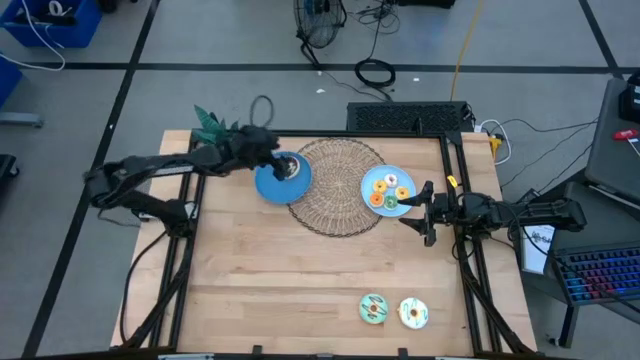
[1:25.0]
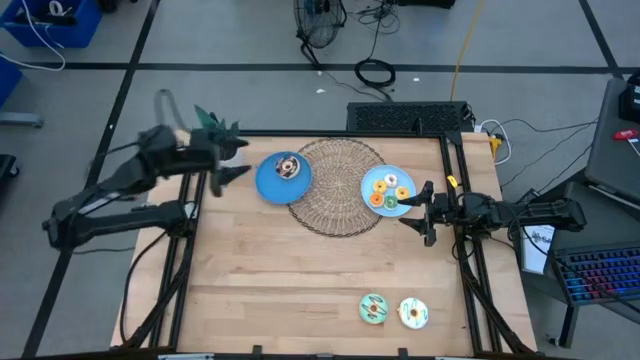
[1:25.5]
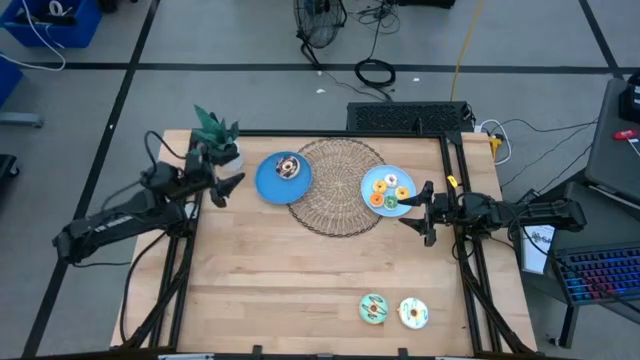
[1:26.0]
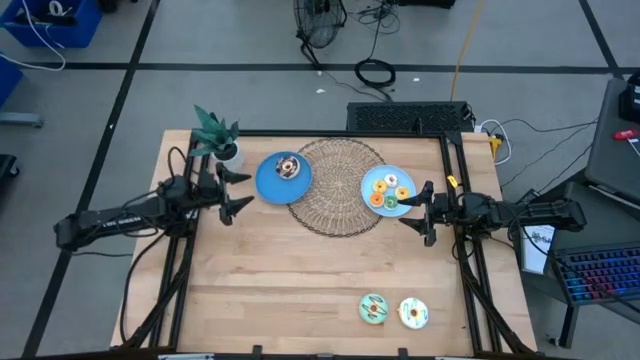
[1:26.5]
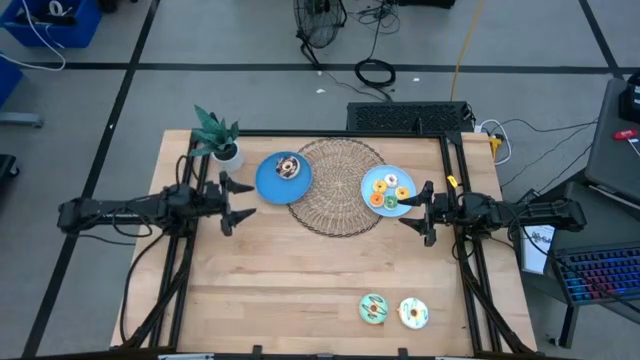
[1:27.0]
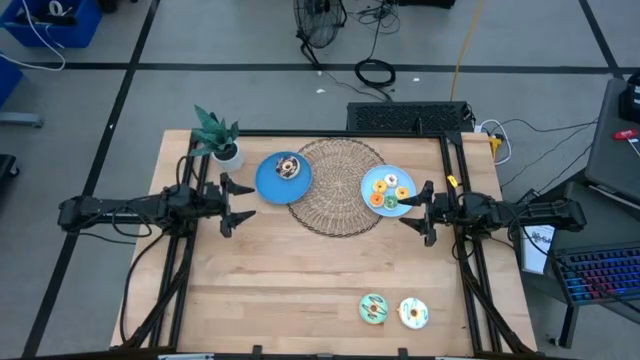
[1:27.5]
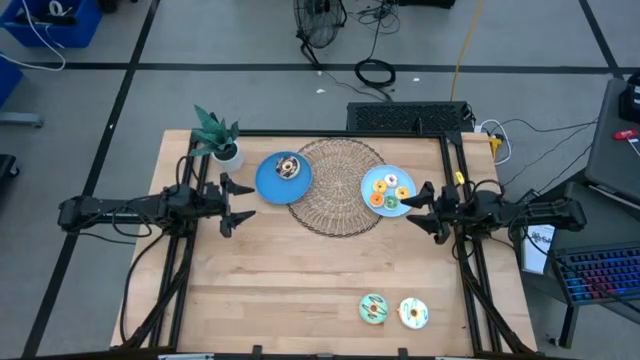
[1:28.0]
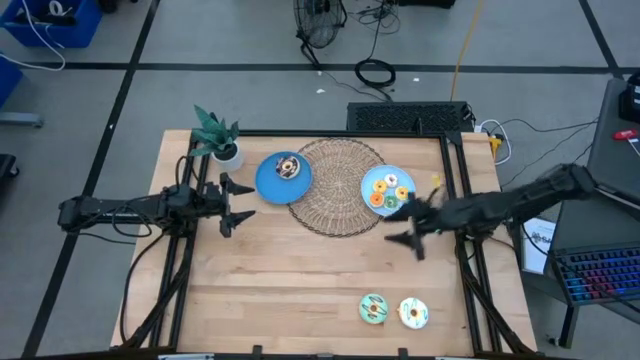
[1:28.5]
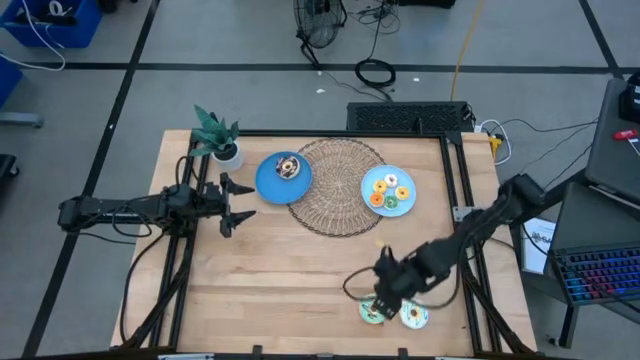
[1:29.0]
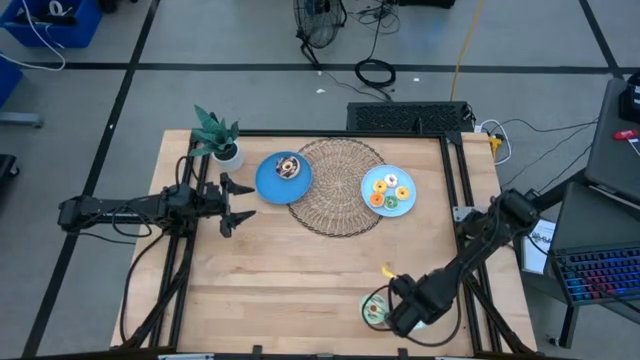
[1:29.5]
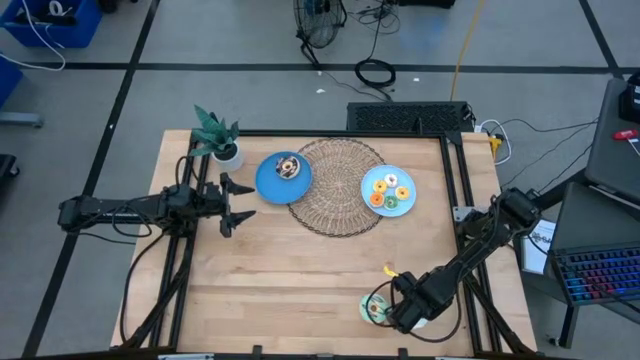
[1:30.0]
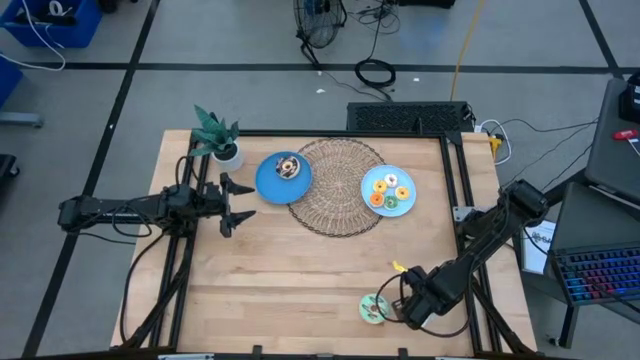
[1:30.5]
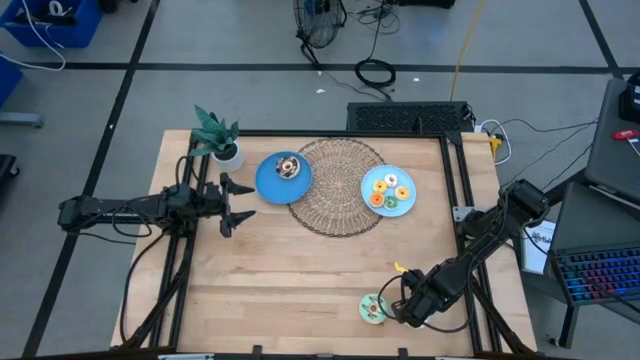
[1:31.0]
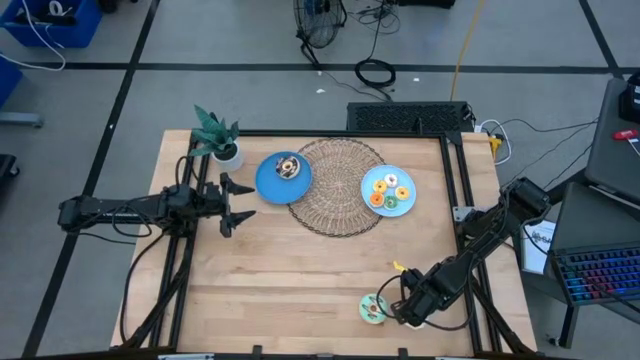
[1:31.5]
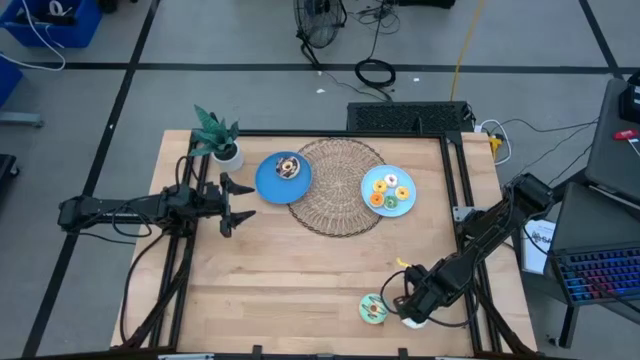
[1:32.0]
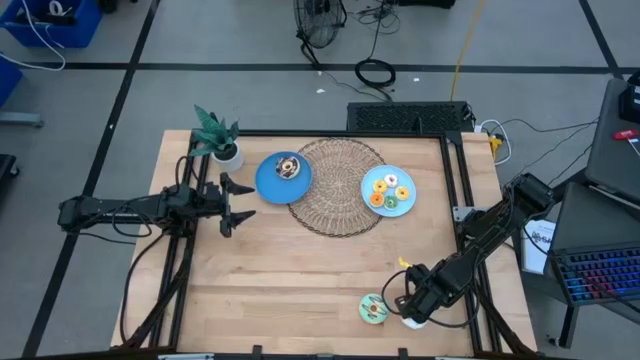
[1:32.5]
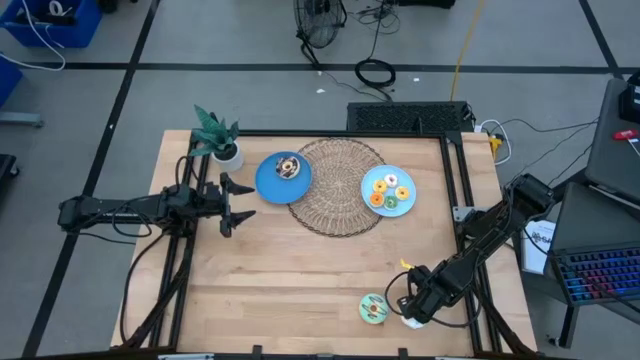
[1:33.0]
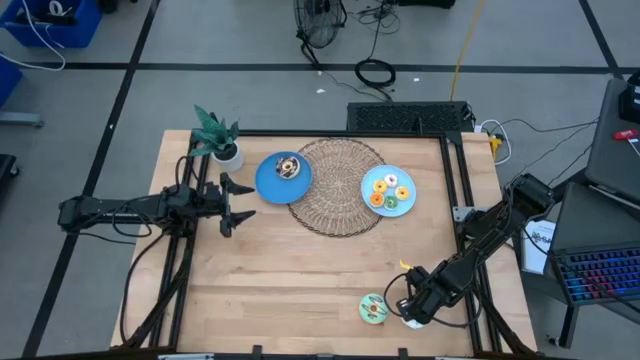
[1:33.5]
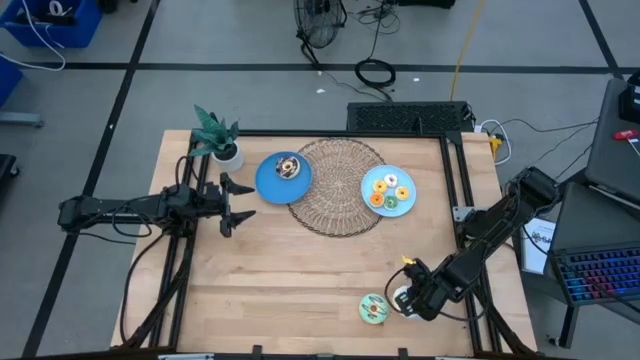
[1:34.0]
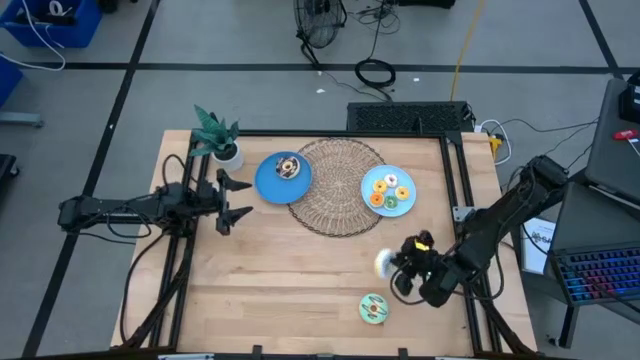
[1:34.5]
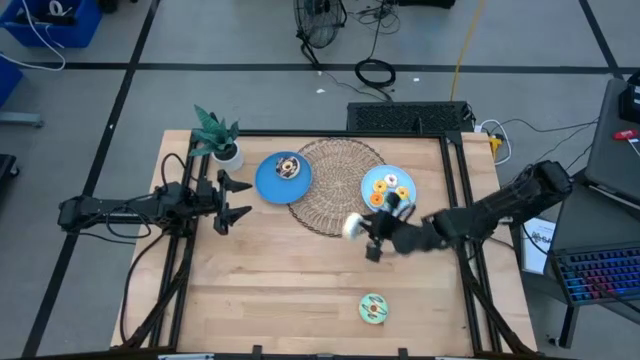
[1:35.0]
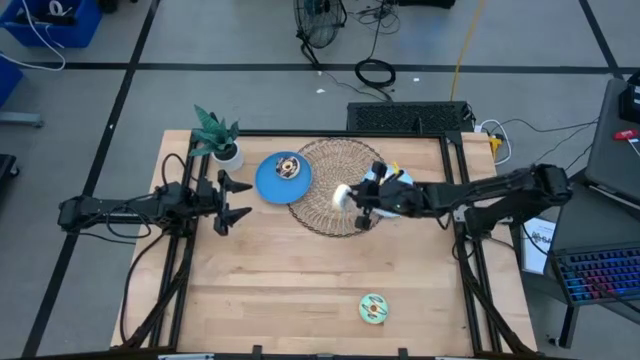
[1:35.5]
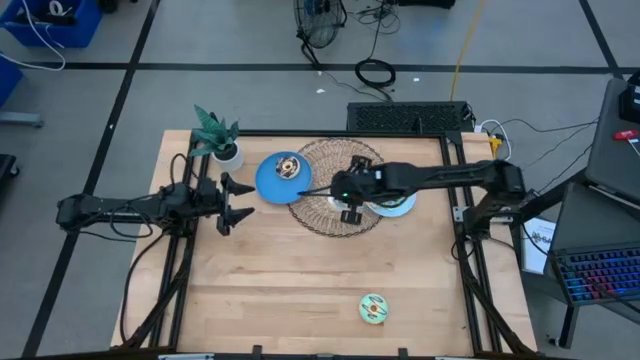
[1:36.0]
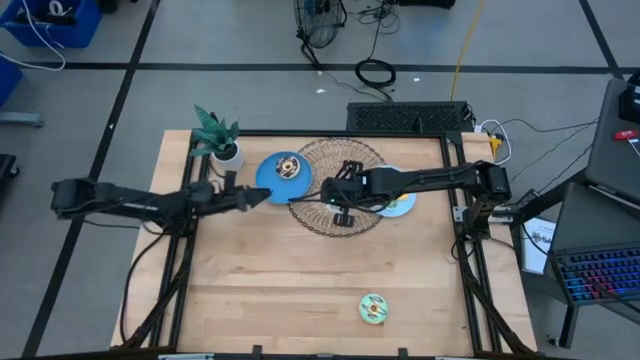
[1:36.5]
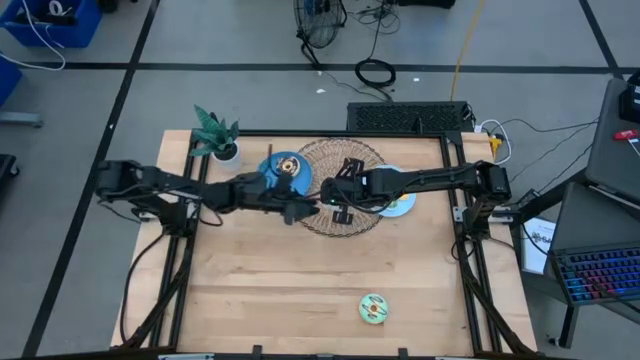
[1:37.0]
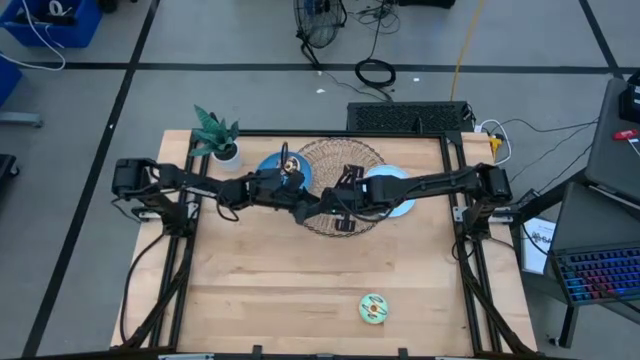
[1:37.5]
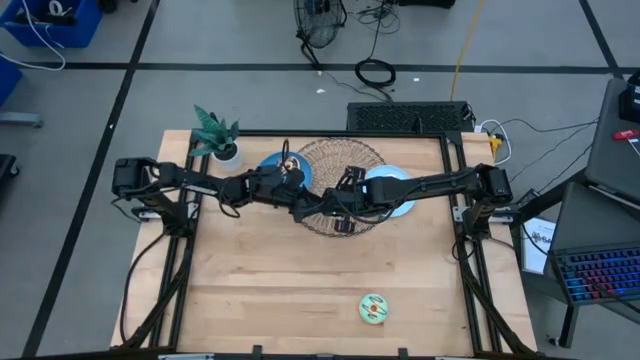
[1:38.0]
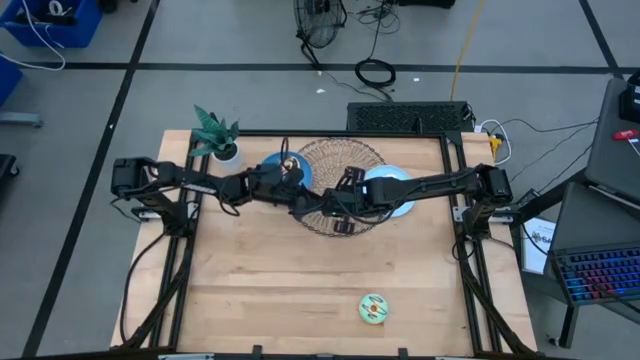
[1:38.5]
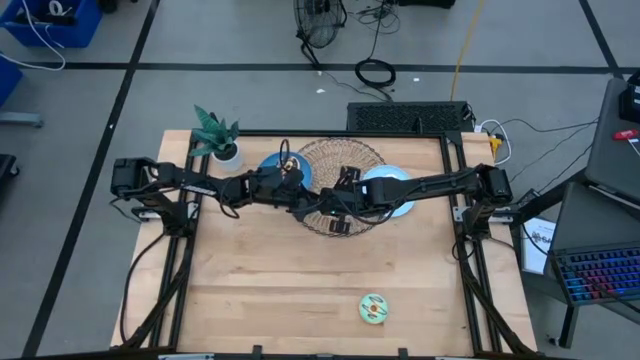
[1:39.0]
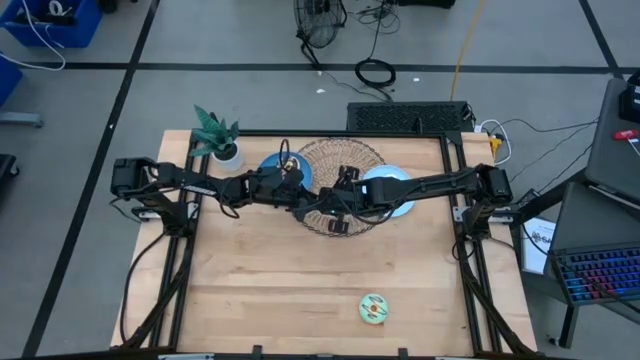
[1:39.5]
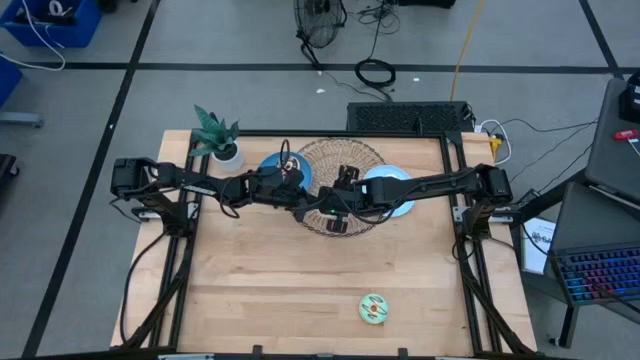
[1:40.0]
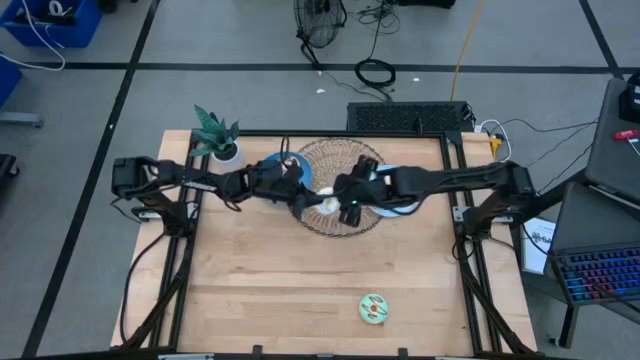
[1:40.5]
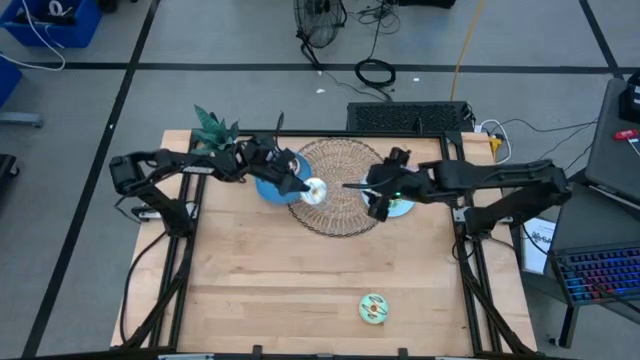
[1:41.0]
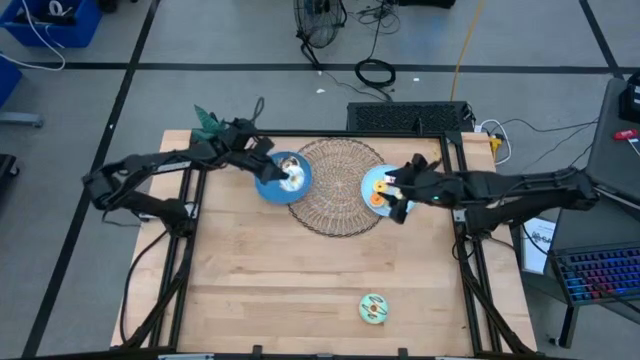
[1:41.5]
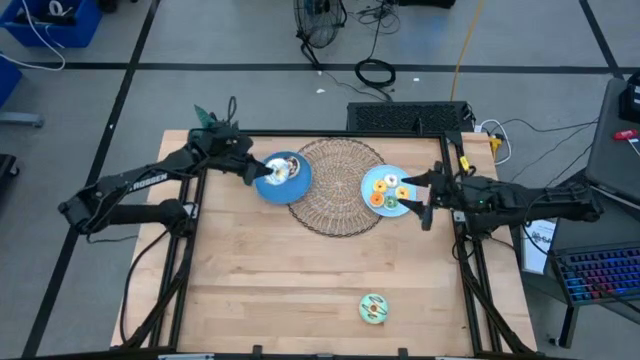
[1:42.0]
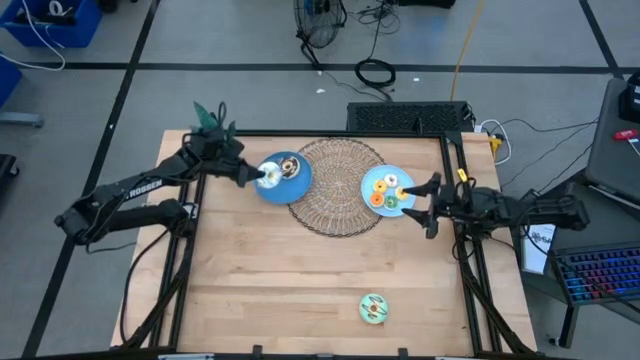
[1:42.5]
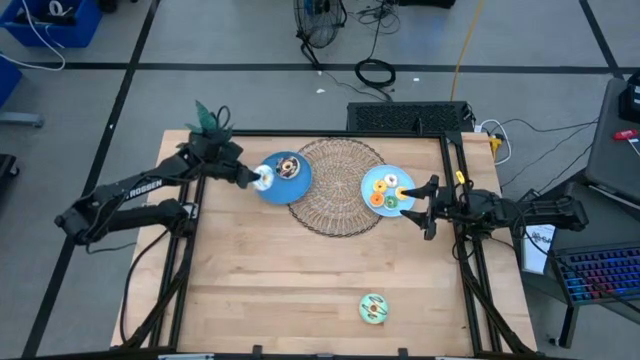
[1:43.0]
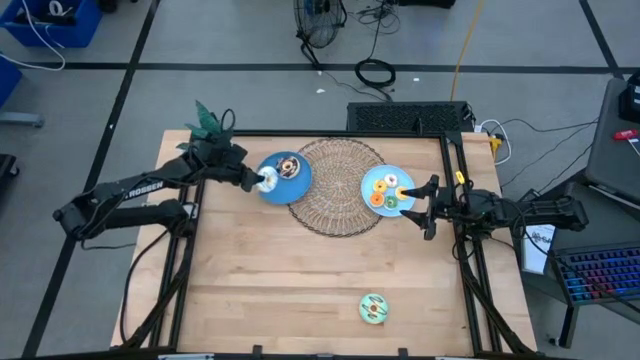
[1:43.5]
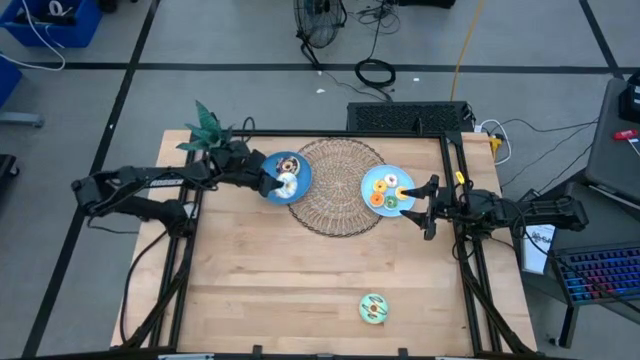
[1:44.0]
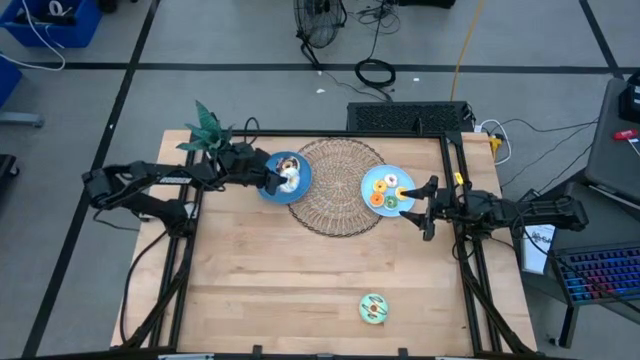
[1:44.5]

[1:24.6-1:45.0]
Task: Pick & Place donuts
Put the large white donut on the dark blue plate
